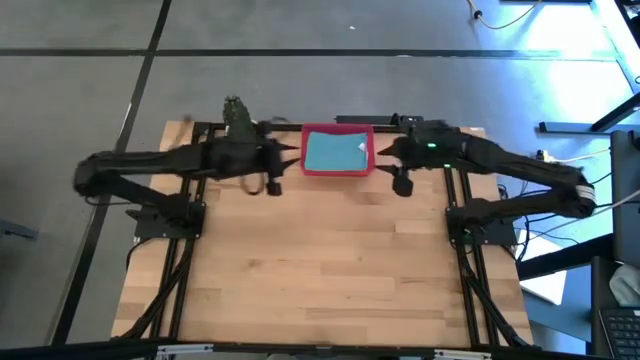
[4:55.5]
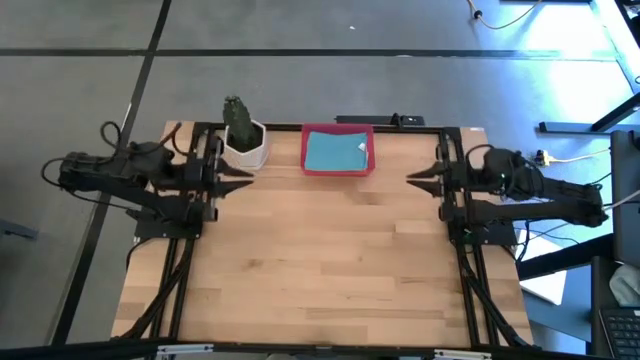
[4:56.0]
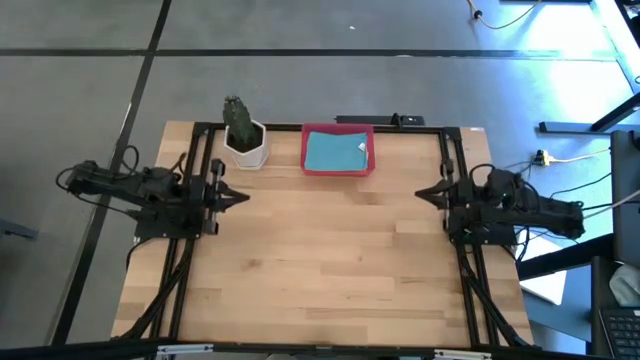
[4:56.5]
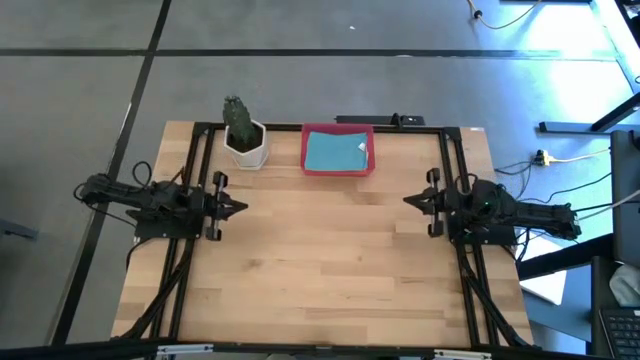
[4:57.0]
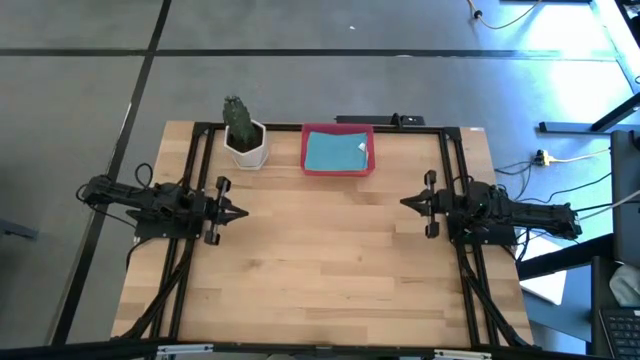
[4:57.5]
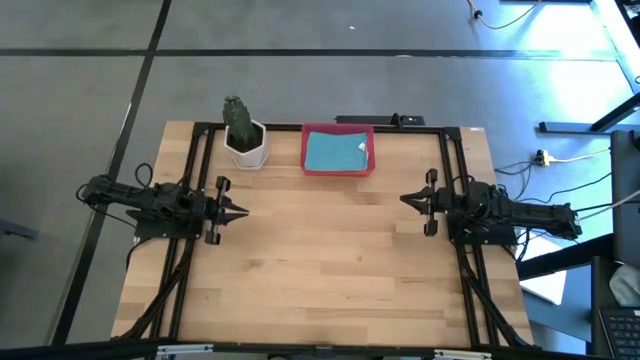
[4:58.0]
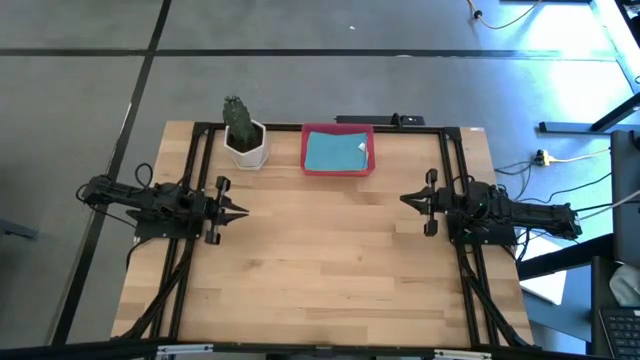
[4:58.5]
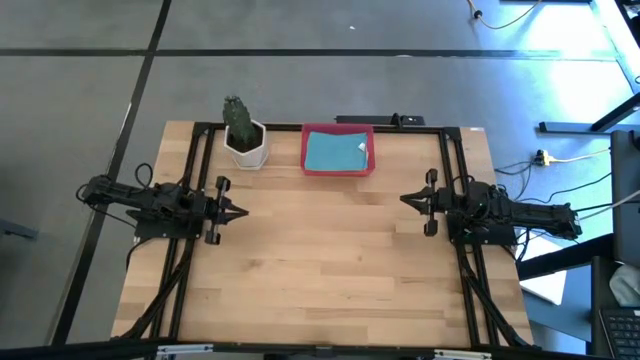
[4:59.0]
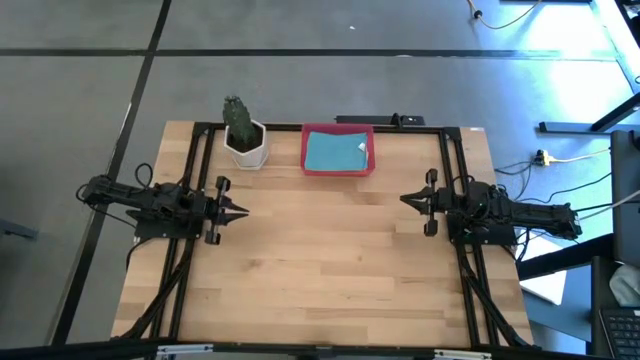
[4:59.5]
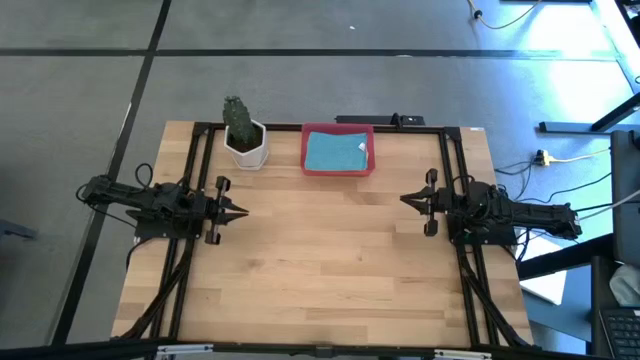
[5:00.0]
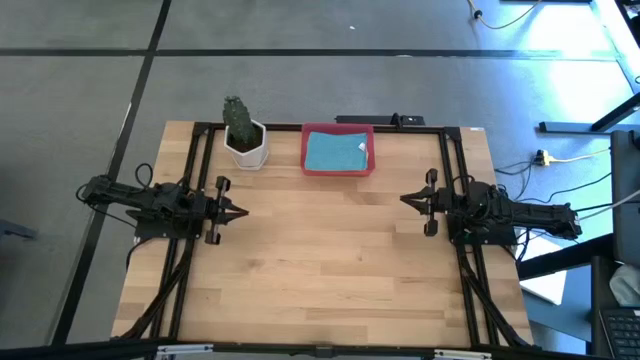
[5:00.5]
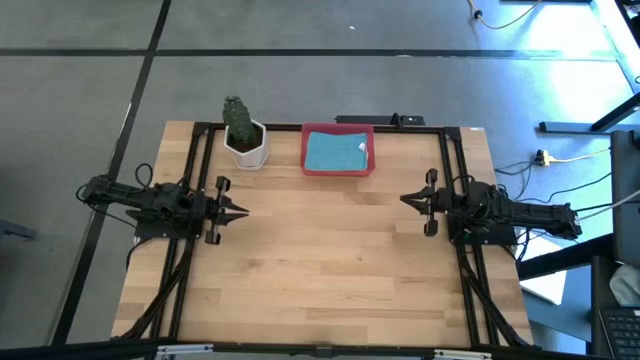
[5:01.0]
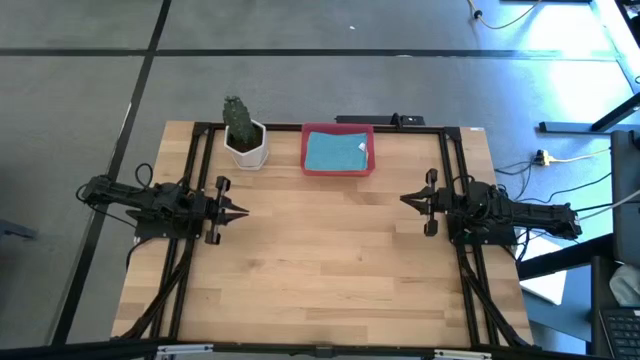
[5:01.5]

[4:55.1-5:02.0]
Task: Fold microfiber towels
Return to Home Position

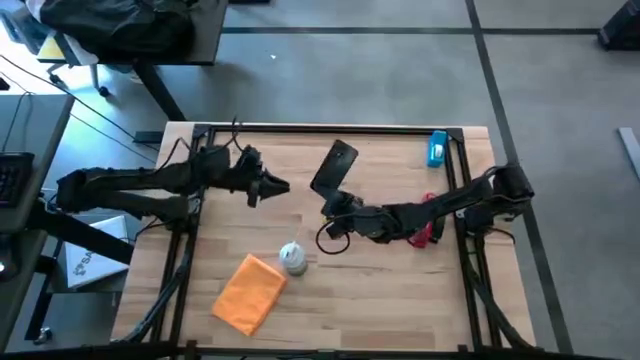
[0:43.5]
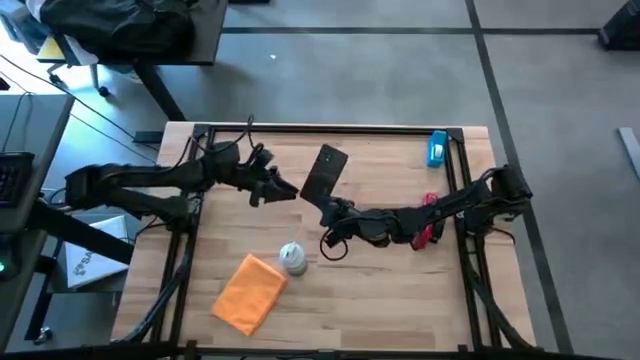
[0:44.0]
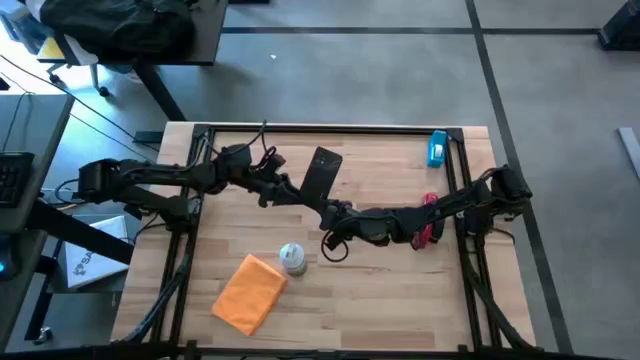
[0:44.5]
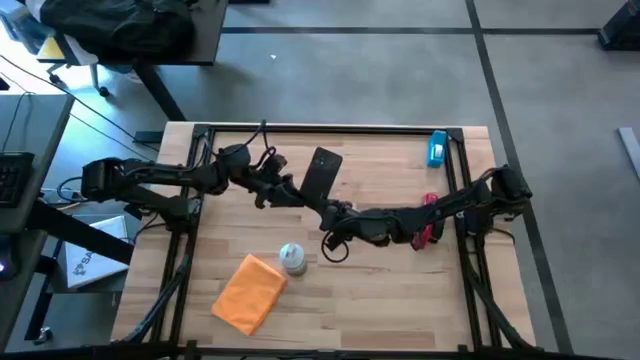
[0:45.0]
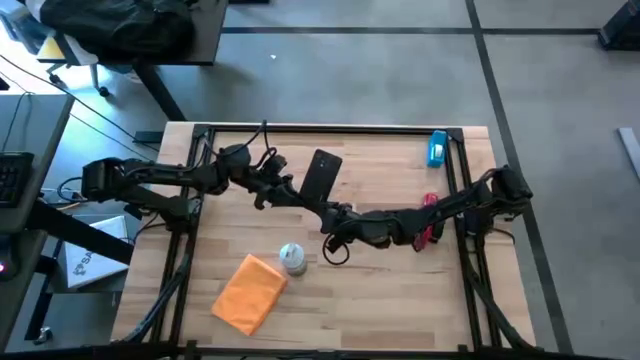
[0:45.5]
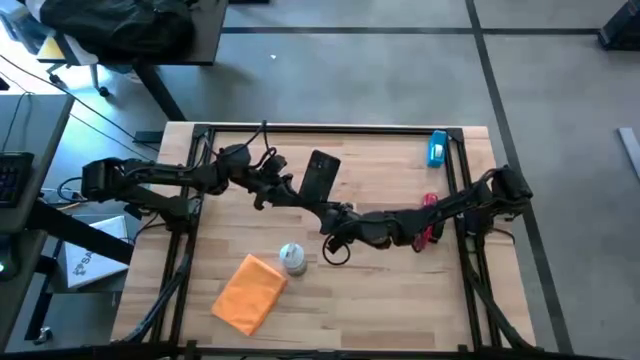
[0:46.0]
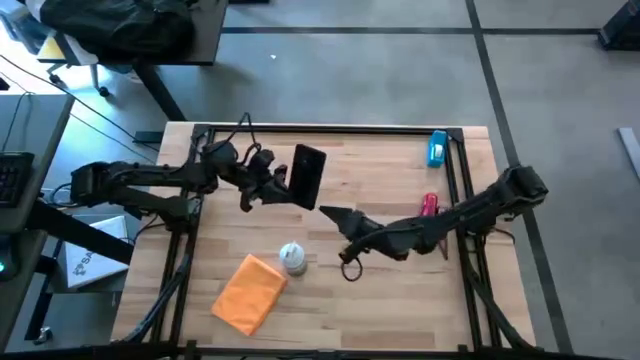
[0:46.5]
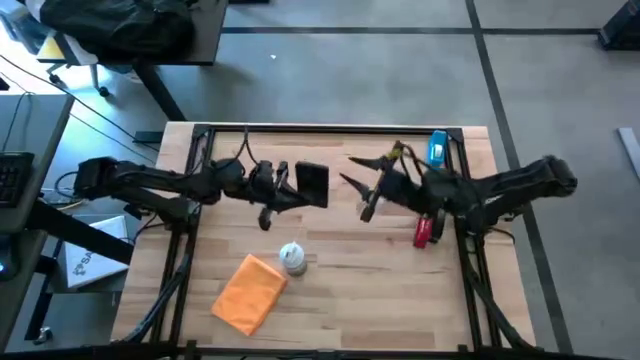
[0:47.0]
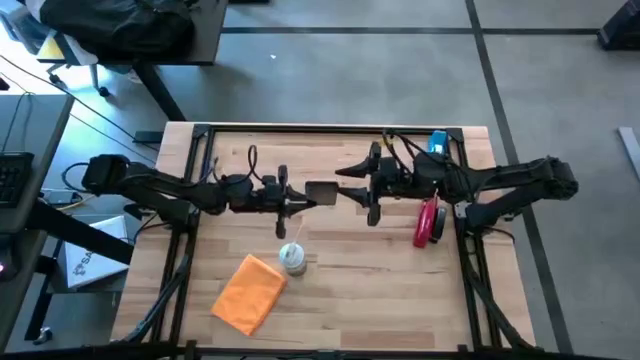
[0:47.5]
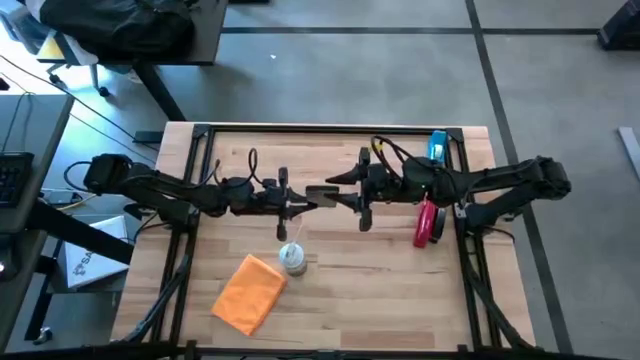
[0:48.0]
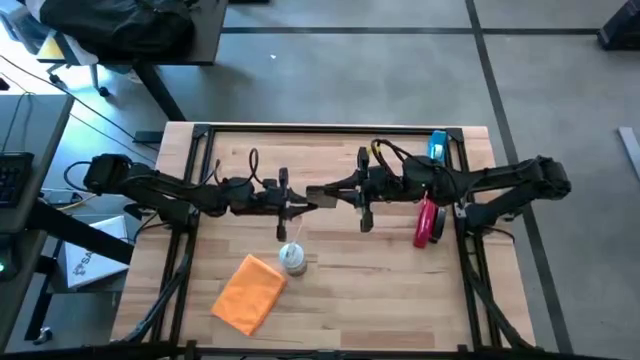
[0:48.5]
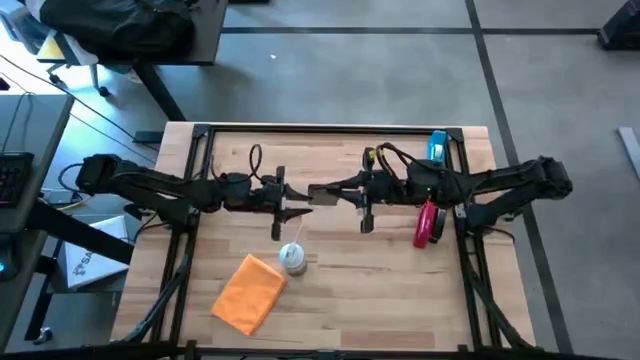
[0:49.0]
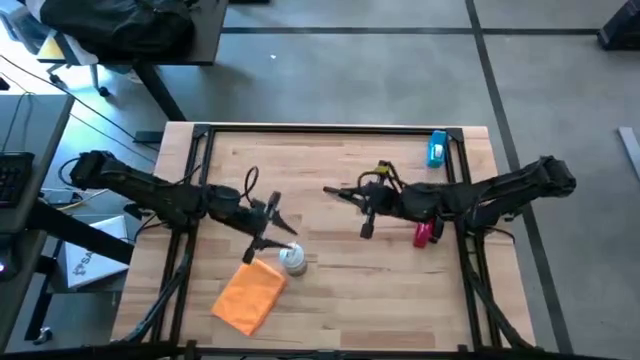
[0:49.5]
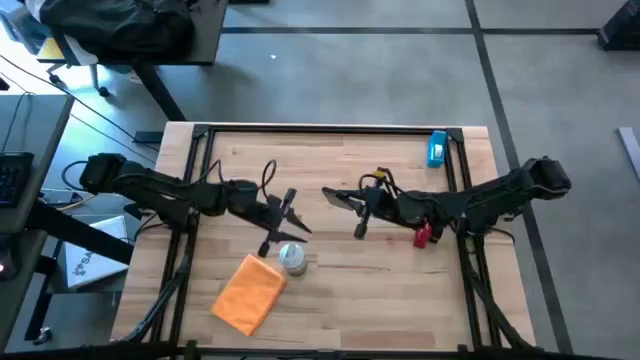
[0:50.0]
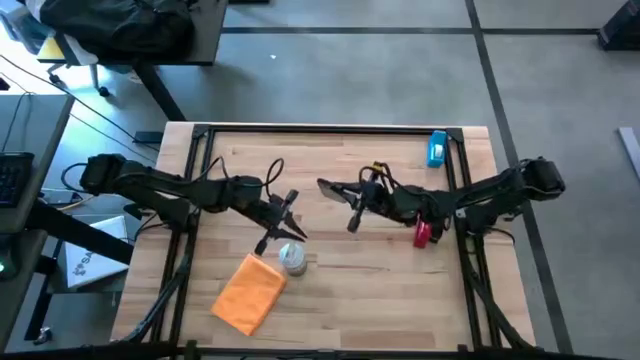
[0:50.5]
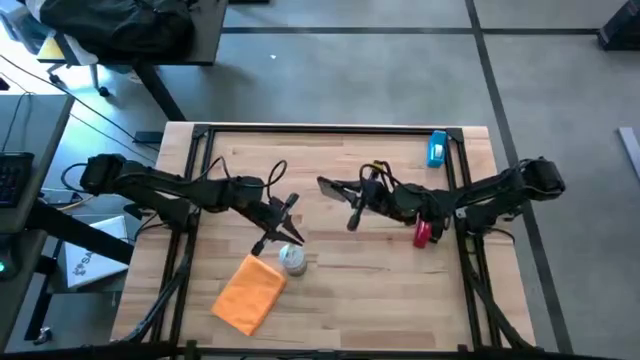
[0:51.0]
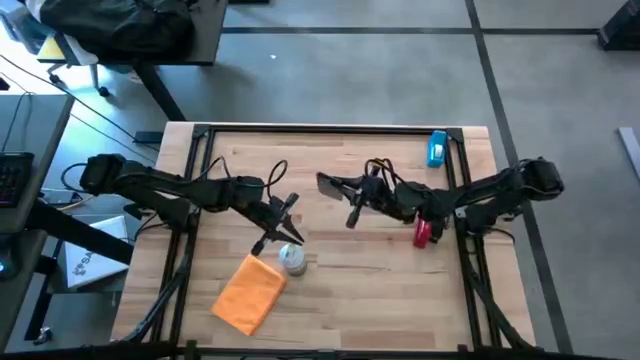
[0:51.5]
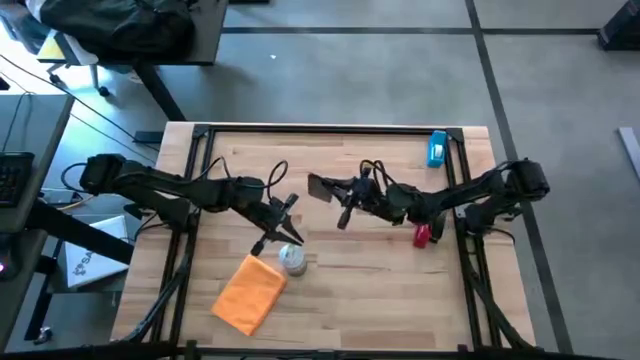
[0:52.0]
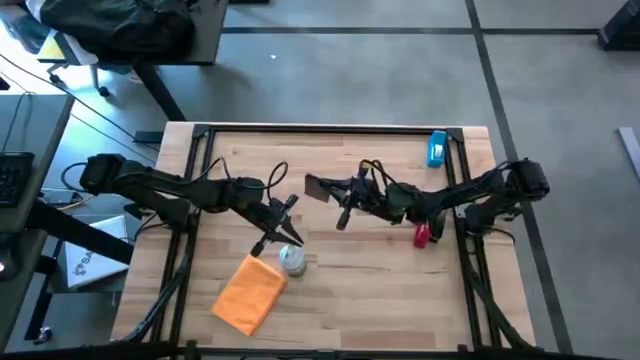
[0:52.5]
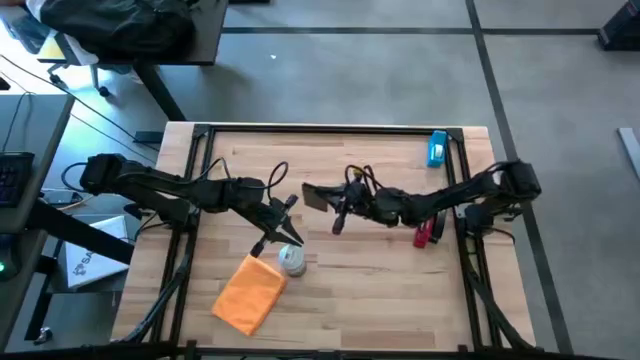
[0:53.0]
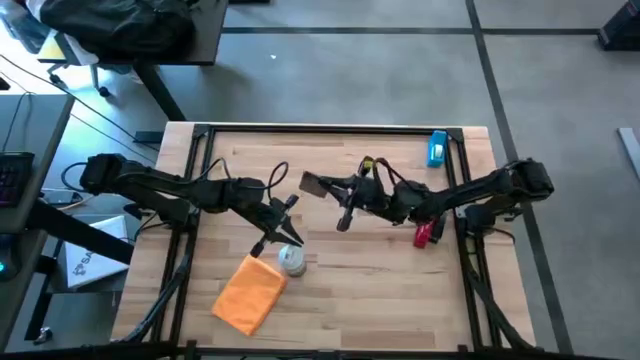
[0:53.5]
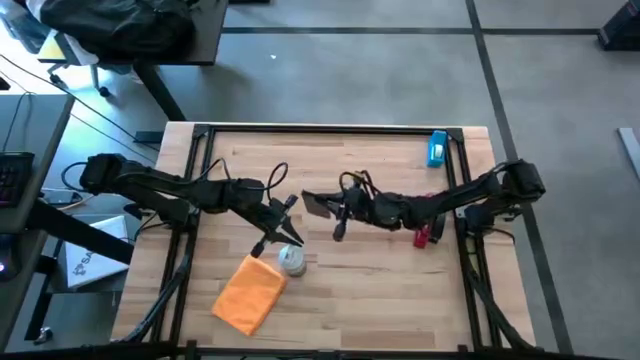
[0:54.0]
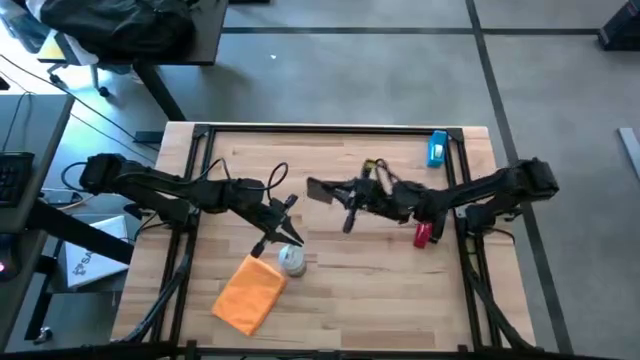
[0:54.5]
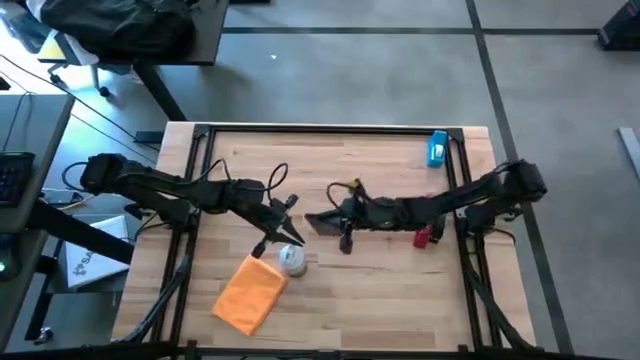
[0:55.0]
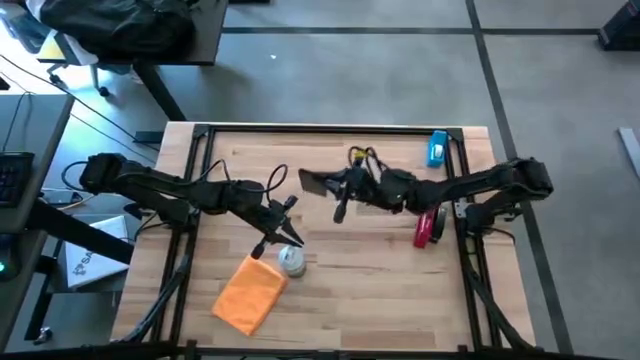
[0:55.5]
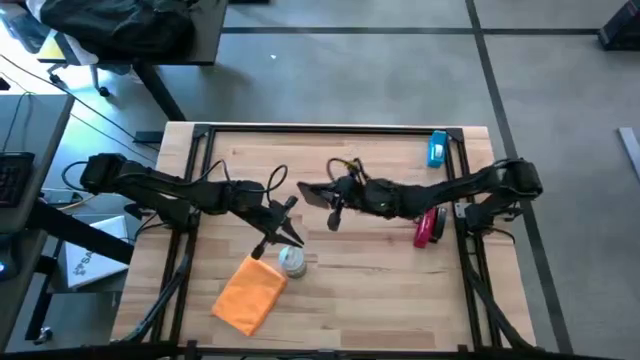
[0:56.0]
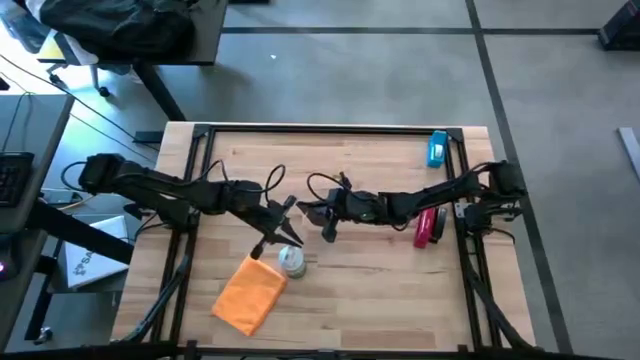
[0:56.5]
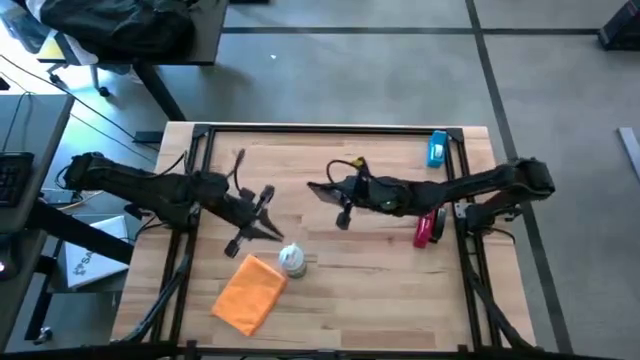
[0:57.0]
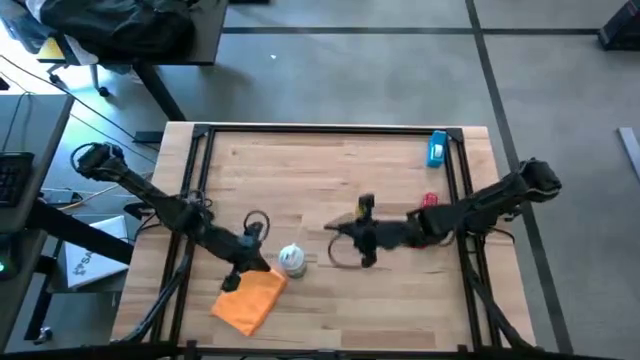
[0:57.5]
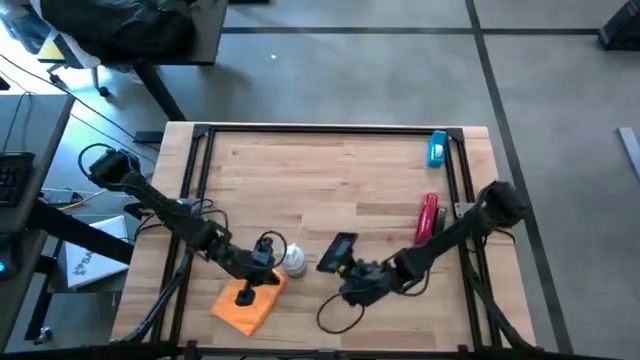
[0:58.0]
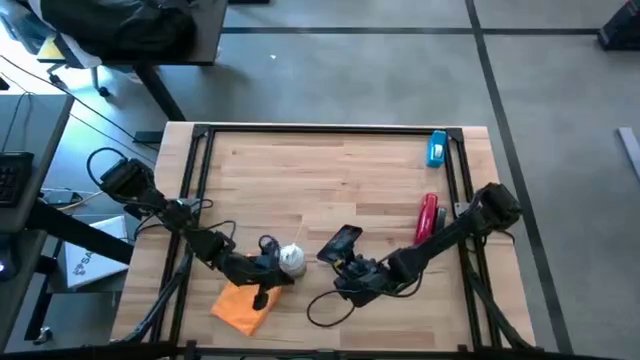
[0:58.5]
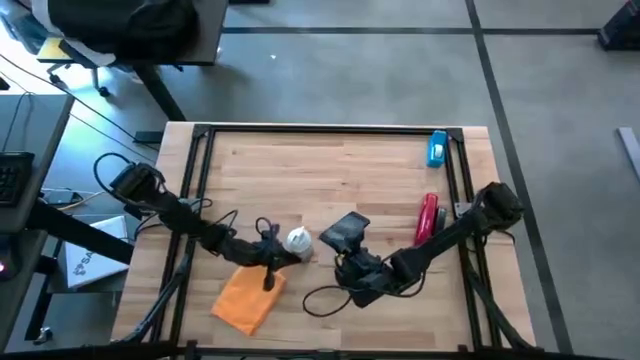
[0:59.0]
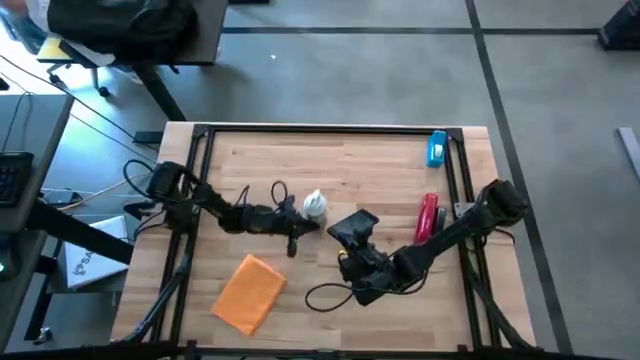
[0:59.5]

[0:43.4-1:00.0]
Task: Apply microfiber cloth
Spray the cellphone using the spray bottle
